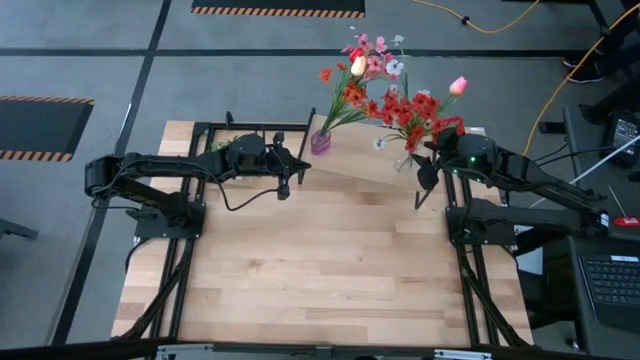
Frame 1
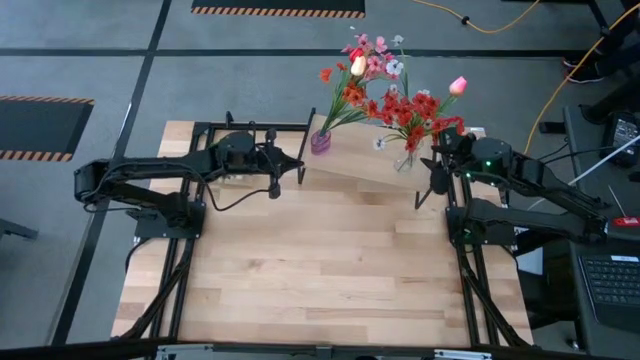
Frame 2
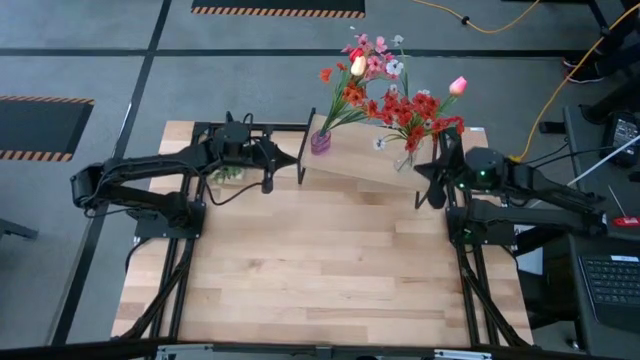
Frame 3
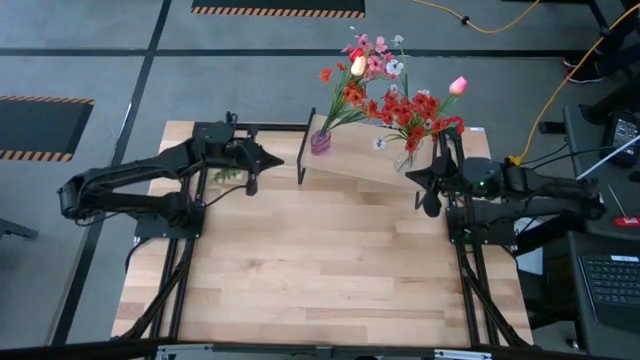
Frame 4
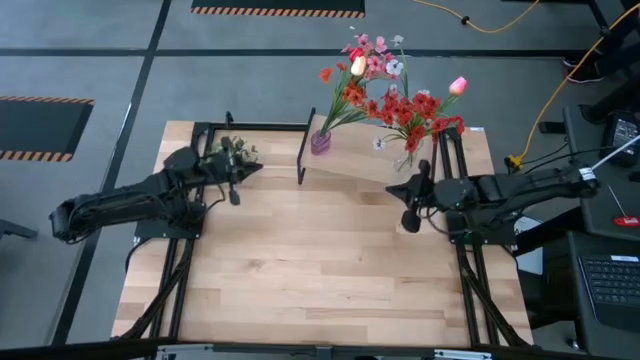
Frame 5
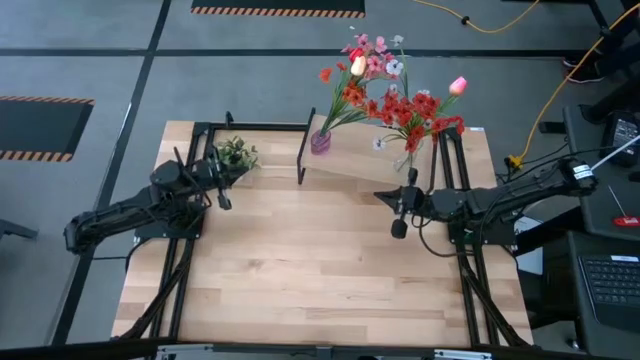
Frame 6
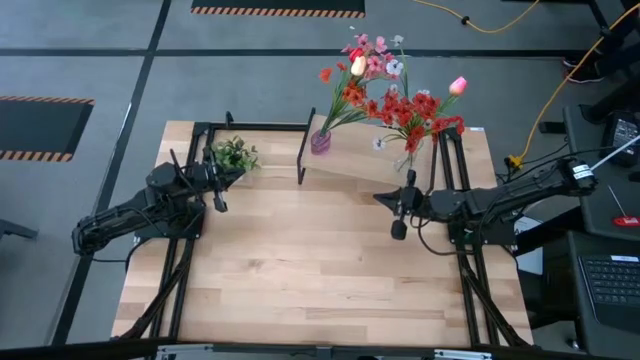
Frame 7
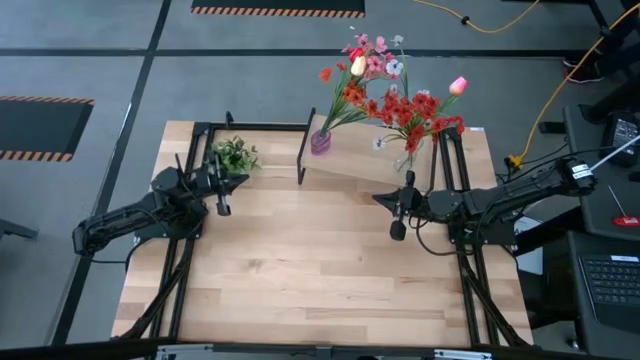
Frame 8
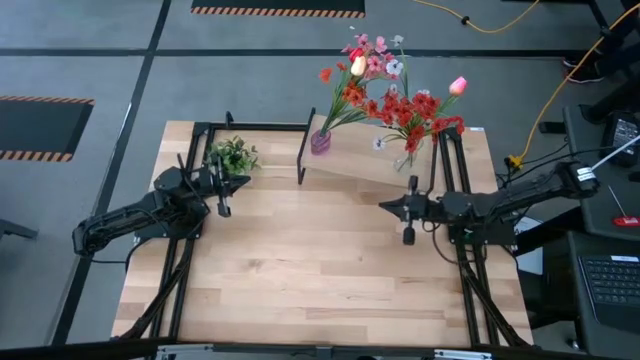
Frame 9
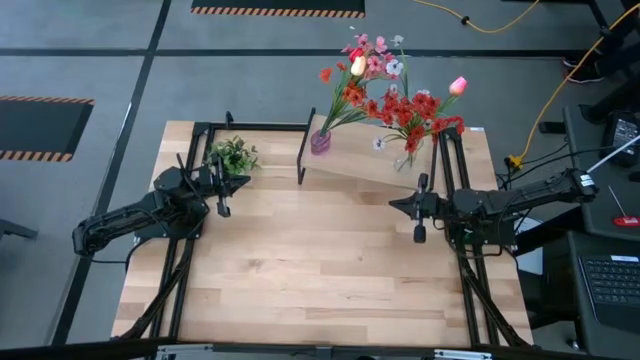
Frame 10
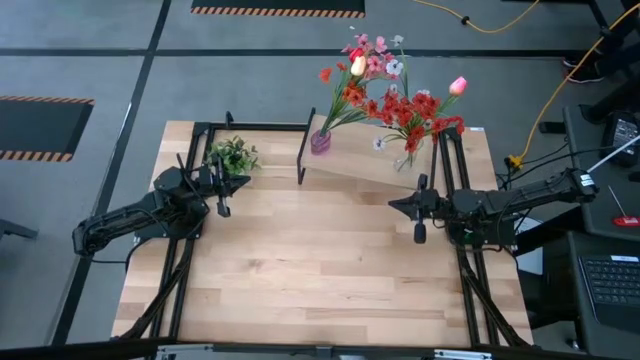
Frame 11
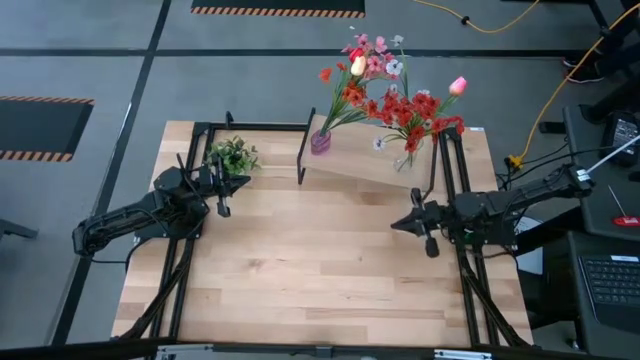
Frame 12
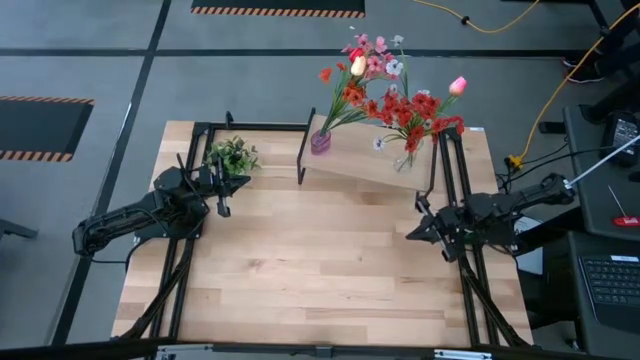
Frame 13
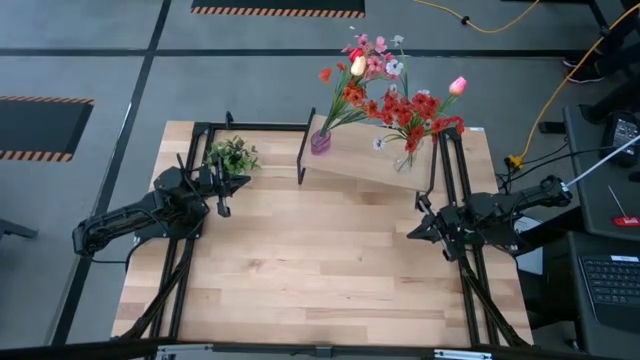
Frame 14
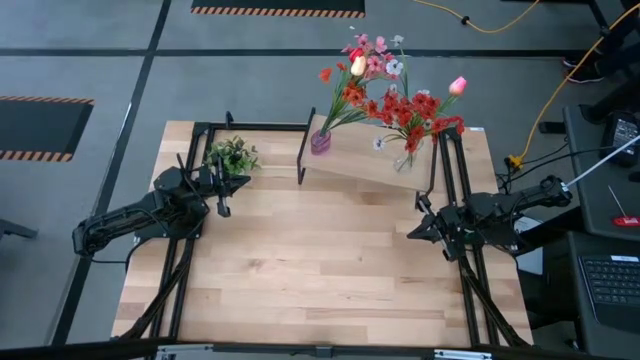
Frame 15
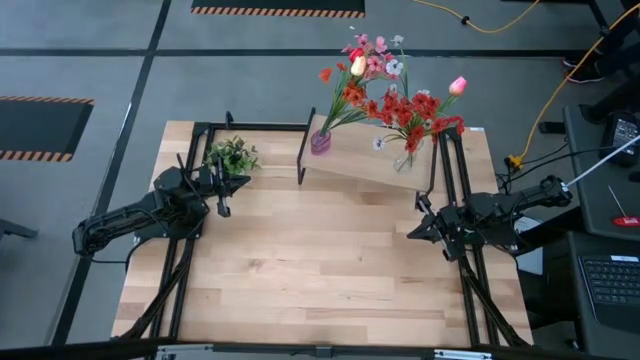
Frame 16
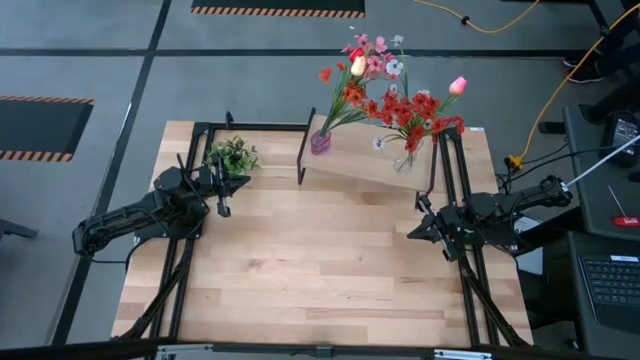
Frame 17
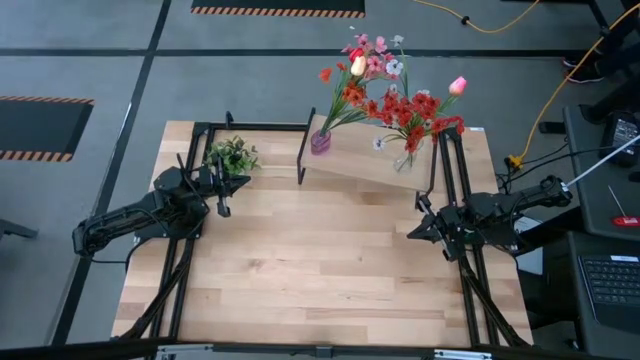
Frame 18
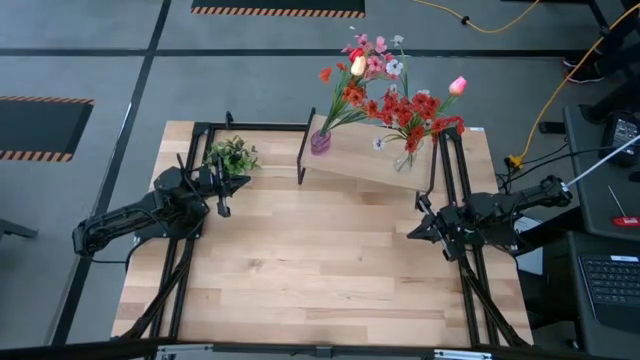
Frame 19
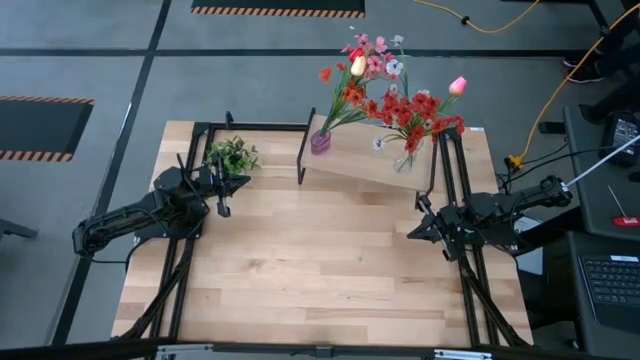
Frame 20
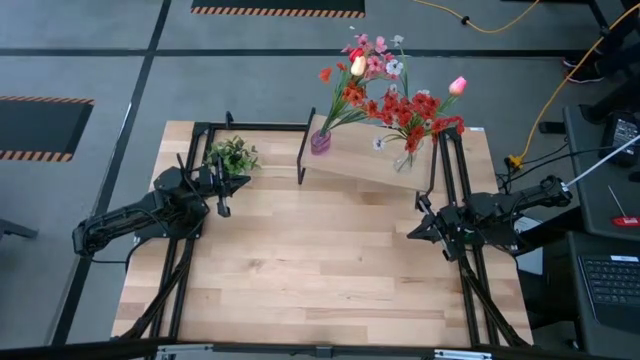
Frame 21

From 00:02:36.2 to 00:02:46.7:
Task: Pick and place flowers into a vace then onto a shelf
Return to Home Position
